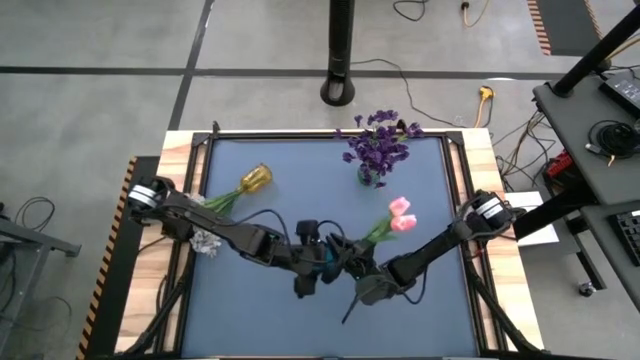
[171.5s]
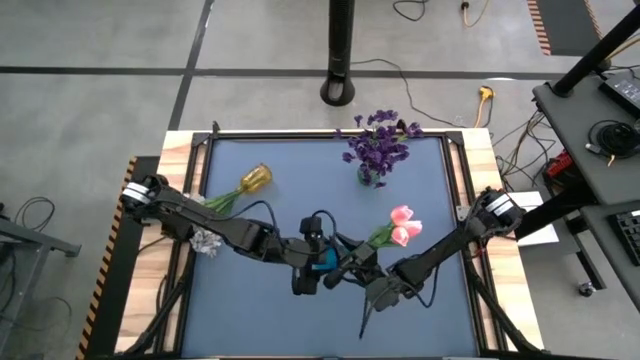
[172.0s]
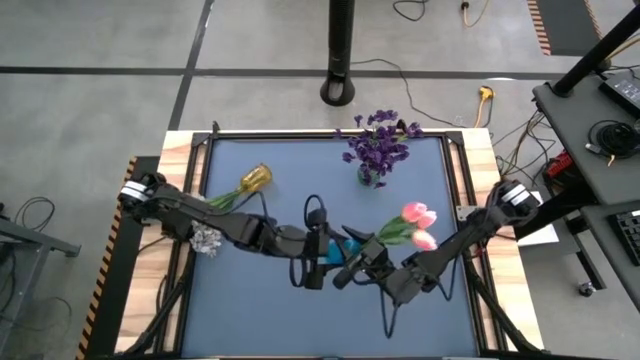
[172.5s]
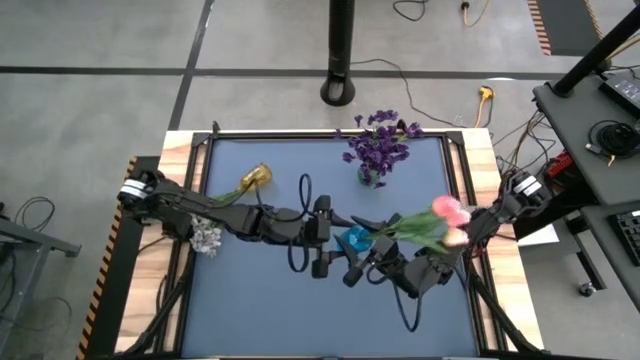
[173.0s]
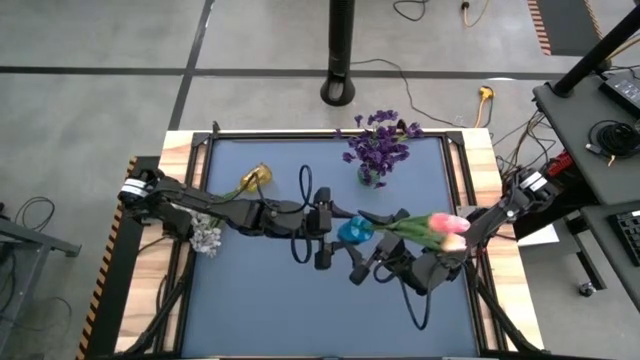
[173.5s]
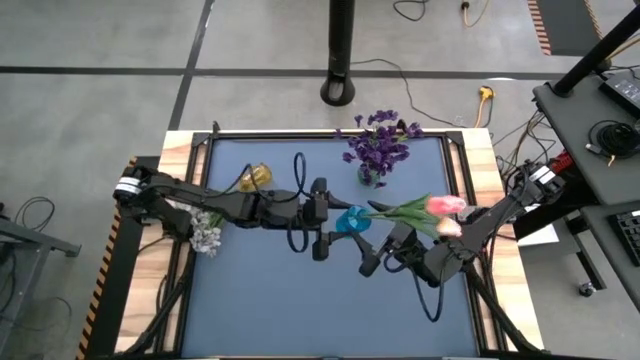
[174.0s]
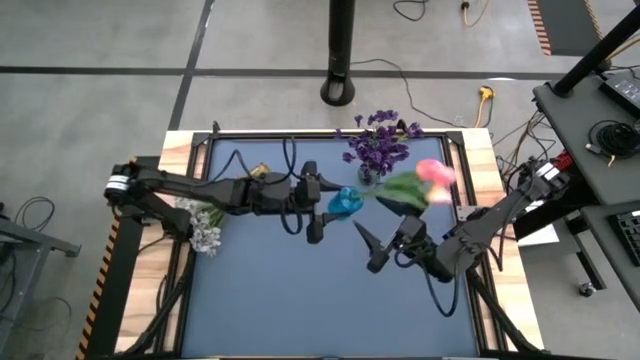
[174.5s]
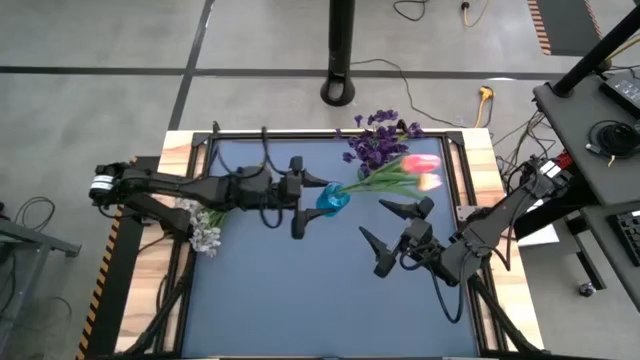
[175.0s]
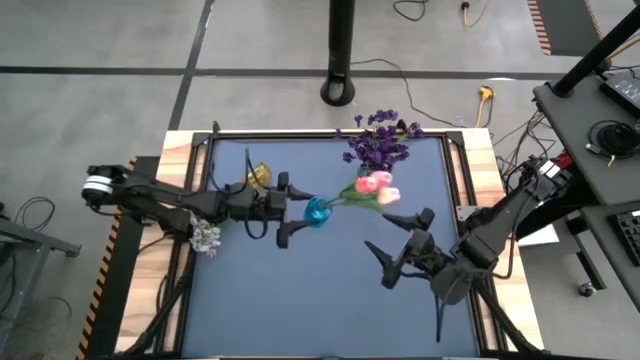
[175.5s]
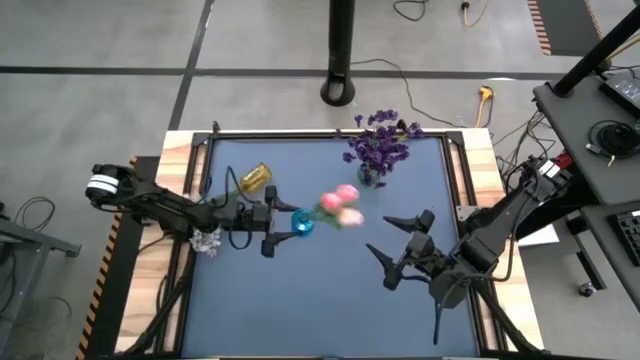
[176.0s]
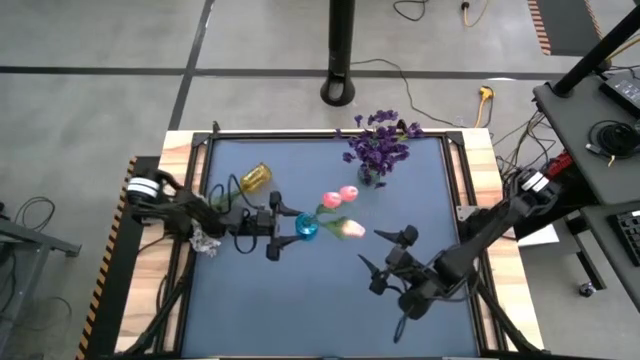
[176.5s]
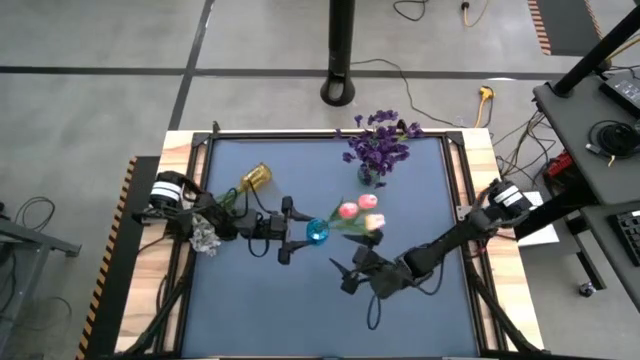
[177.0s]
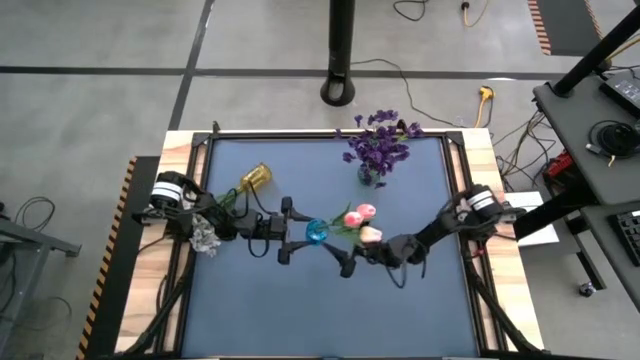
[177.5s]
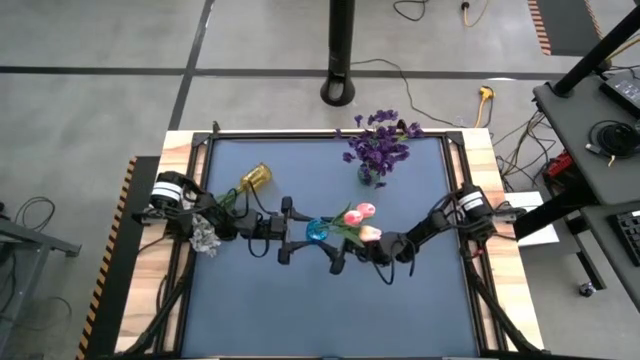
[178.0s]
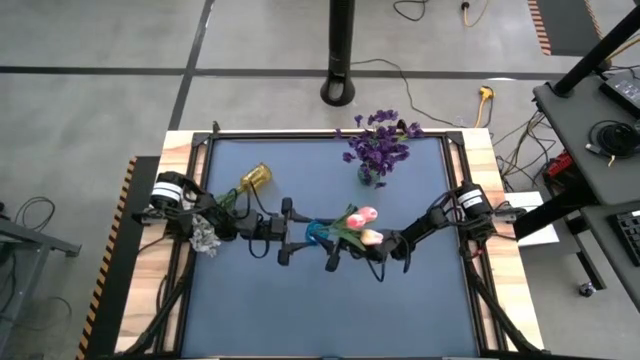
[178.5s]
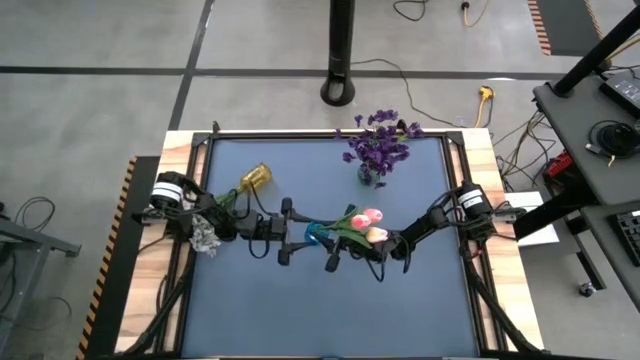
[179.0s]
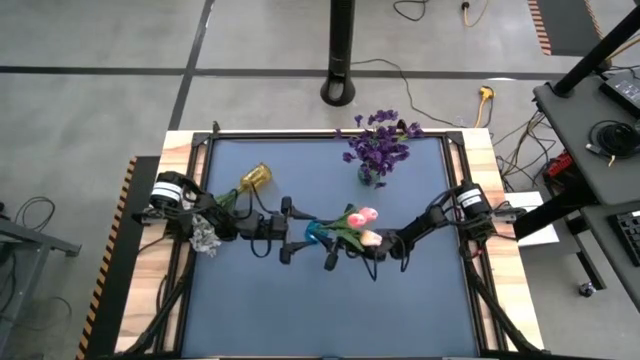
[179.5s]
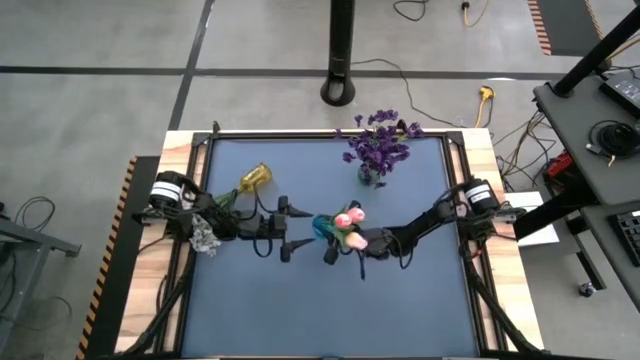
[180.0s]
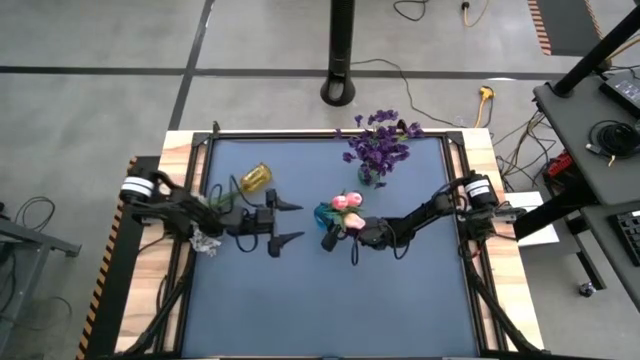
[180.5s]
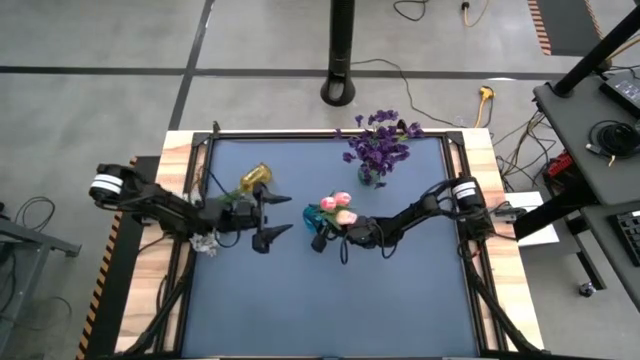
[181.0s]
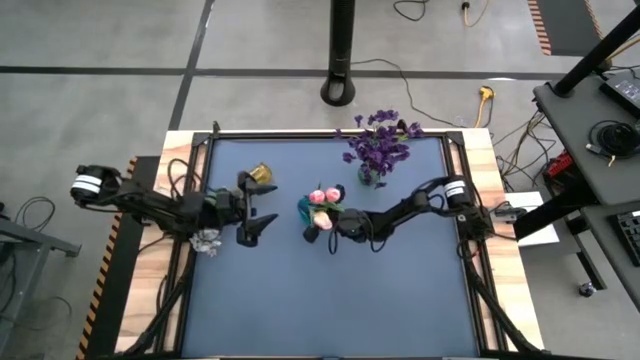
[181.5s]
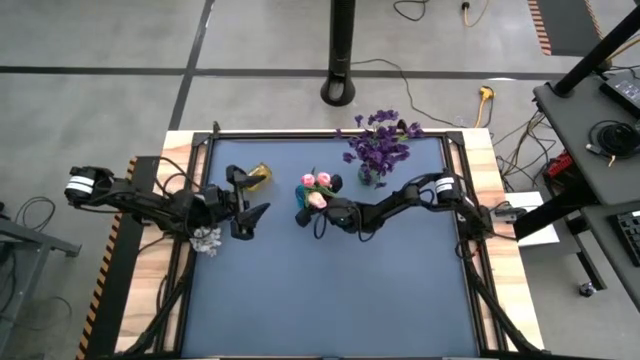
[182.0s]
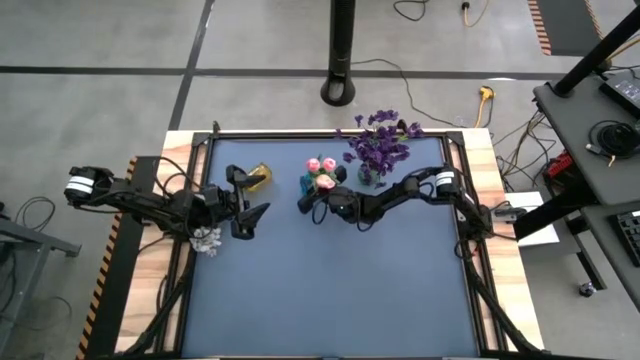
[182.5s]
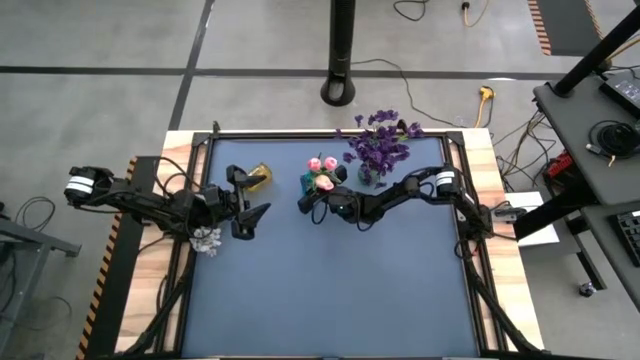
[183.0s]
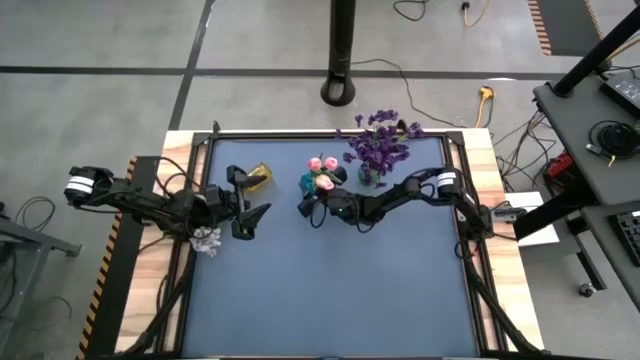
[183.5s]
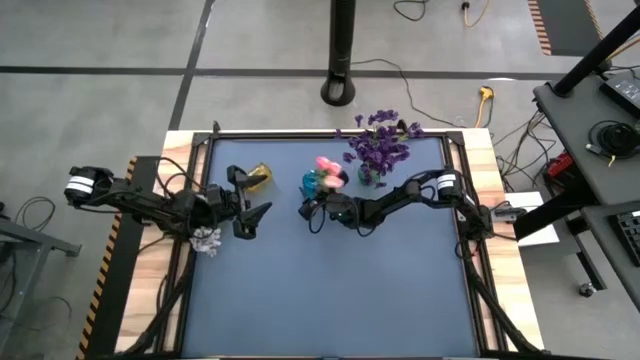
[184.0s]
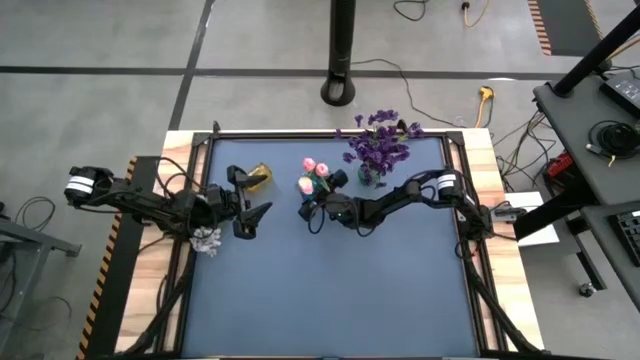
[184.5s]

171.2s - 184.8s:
Task: Sort flowers into vase by color
Put the blue vase with flowers on the table

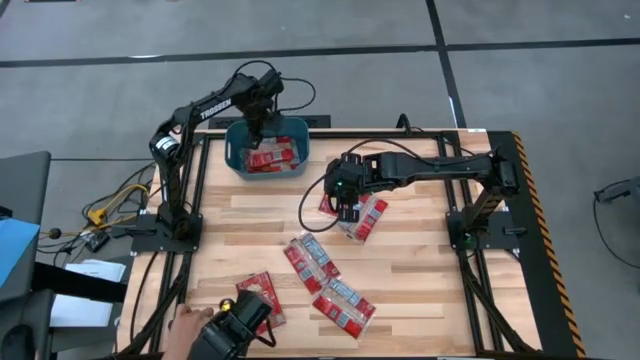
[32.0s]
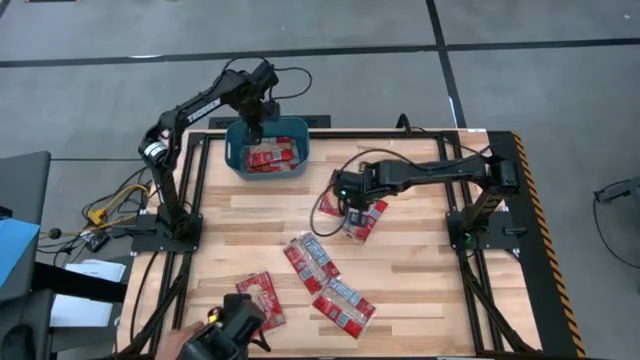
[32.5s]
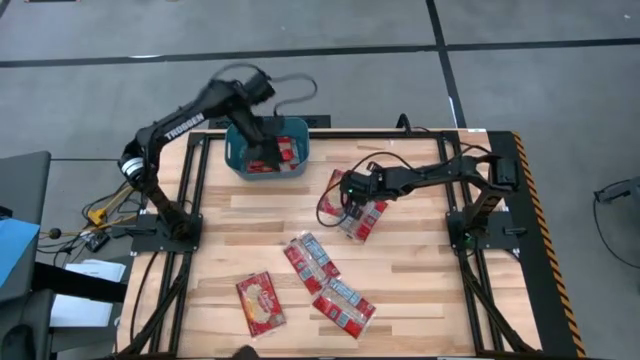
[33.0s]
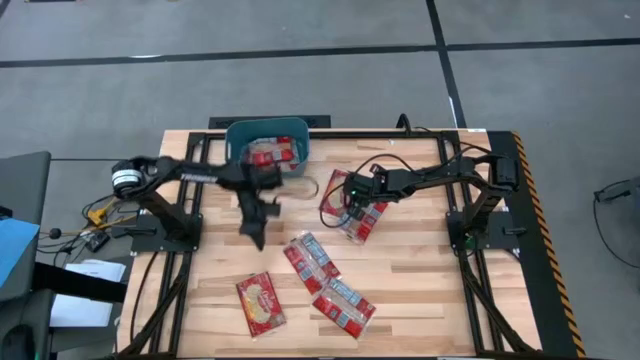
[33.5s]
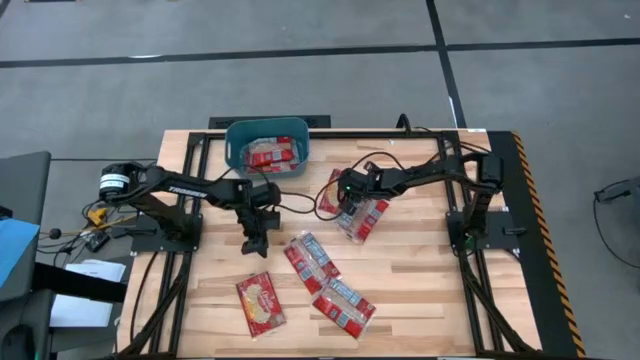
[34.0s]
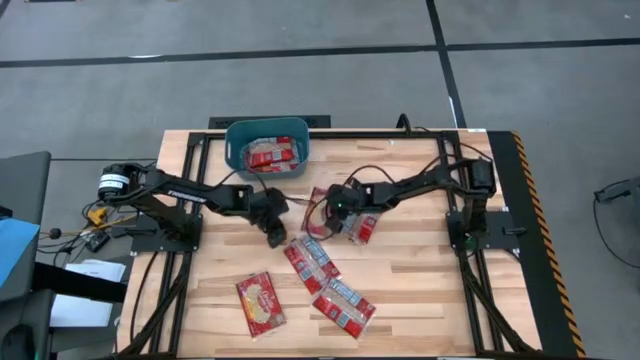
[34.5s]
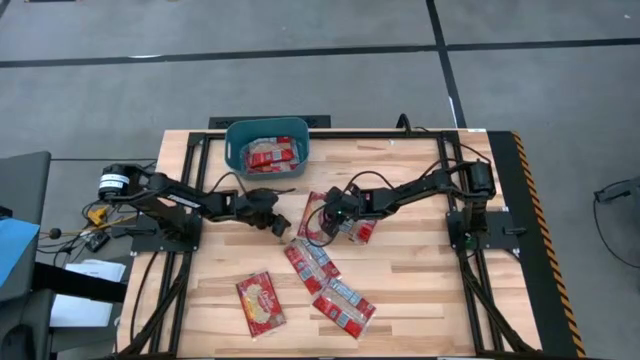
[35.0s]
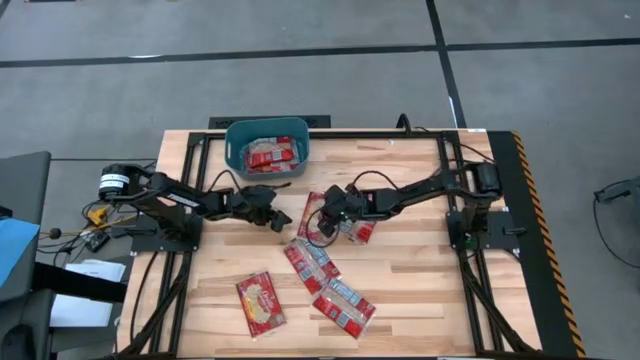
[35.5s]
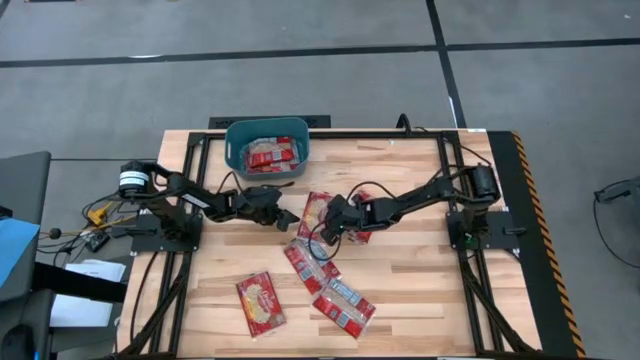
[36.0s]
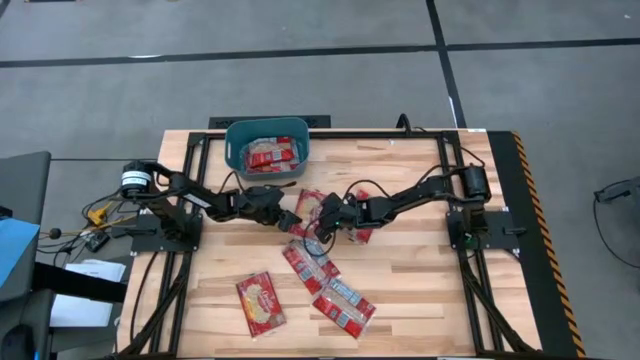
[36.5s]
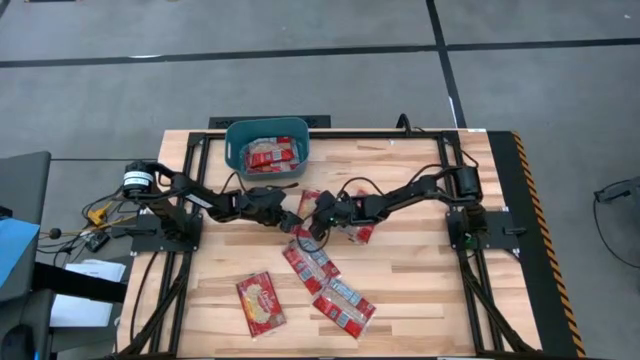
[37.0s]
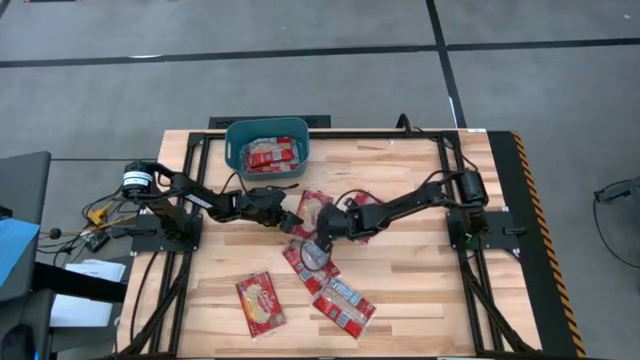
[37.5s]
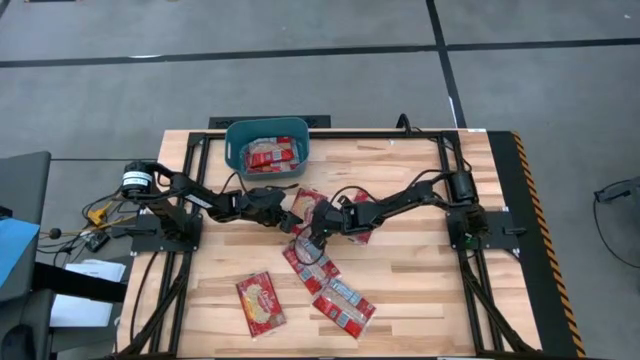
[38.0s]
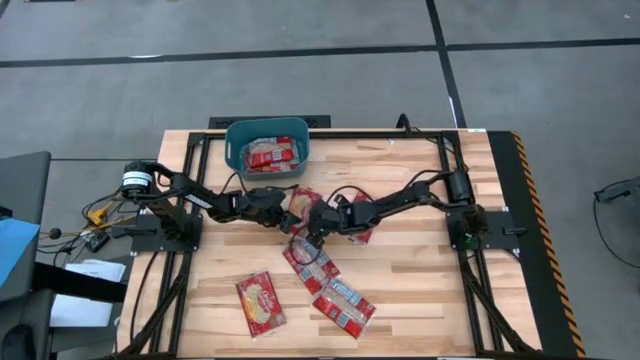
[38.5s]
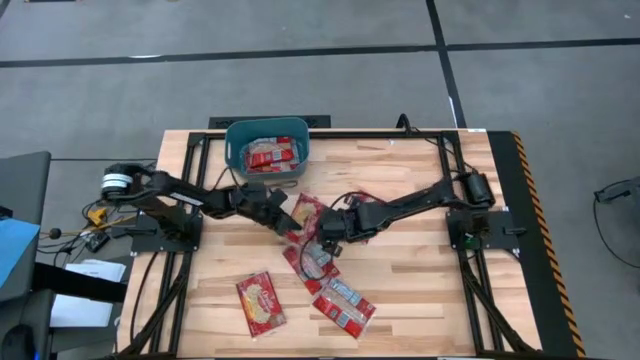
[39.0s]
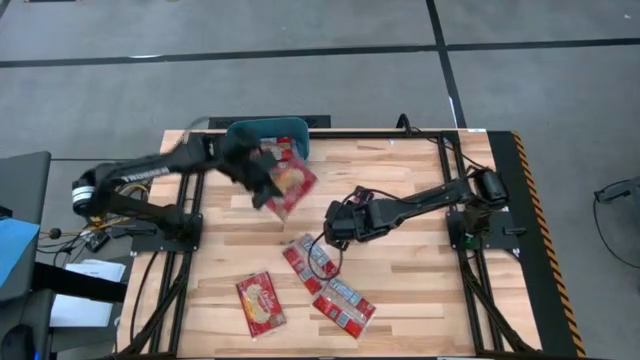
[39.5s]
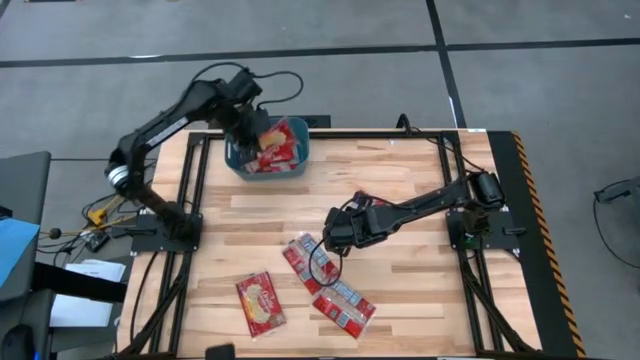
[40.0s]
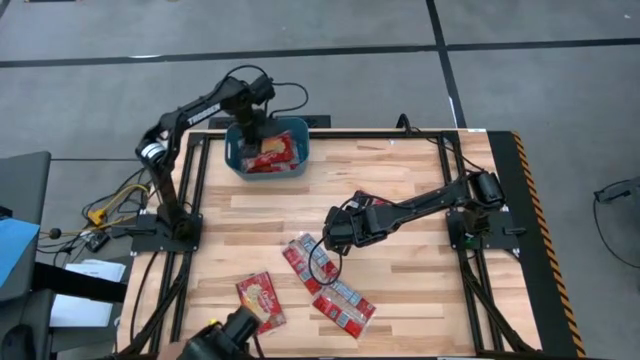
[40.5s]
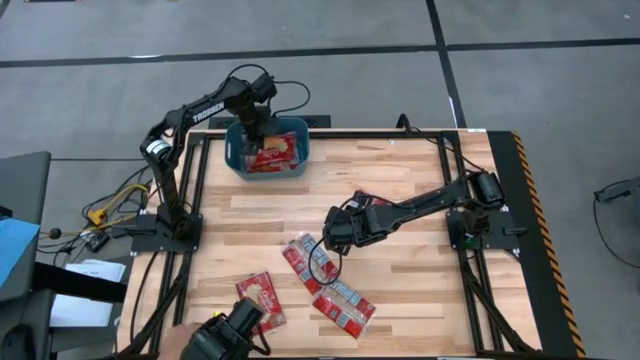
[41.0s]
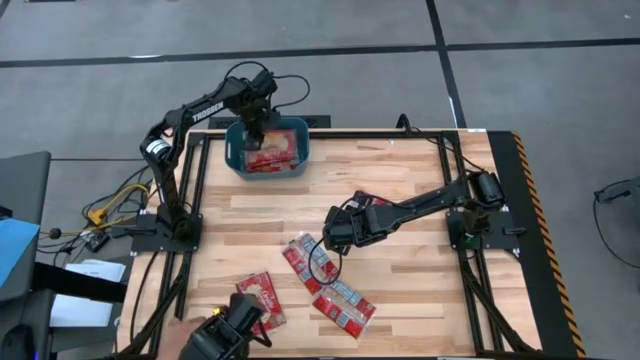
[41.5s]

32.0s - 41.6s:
Task: Sort popcorn bags into baskets
Put the red popcorn bag into the blue bin
